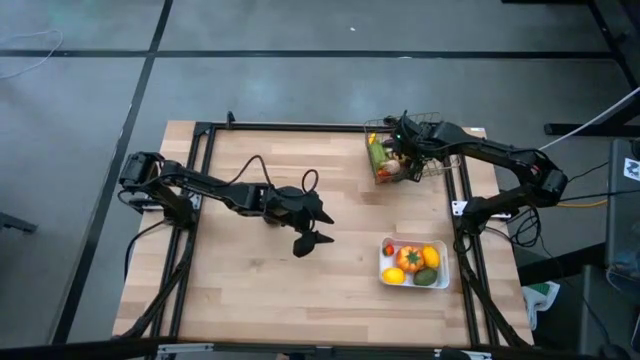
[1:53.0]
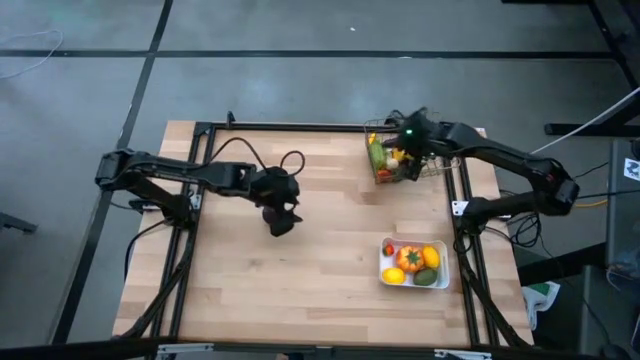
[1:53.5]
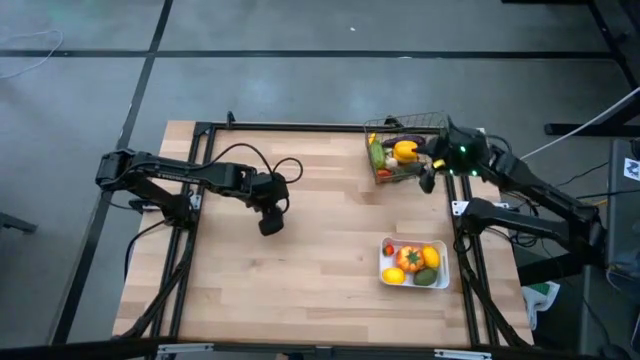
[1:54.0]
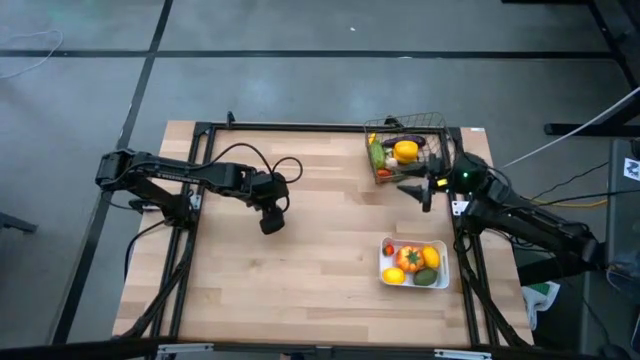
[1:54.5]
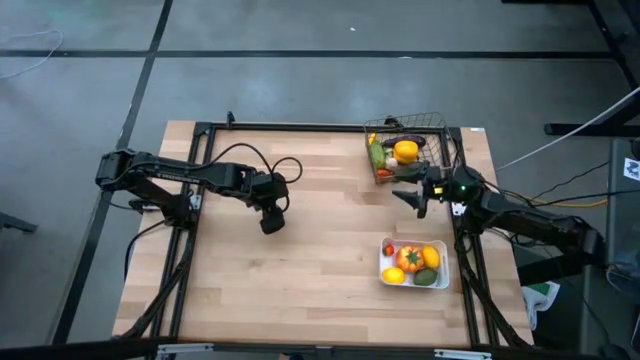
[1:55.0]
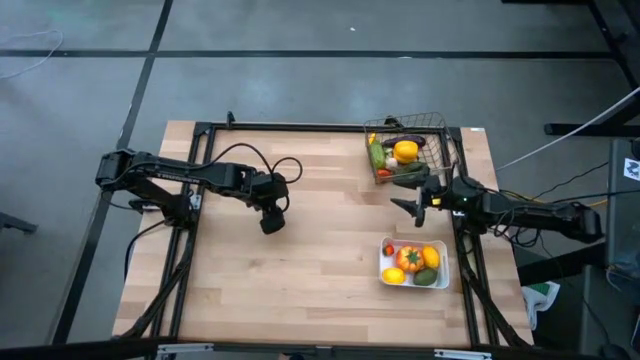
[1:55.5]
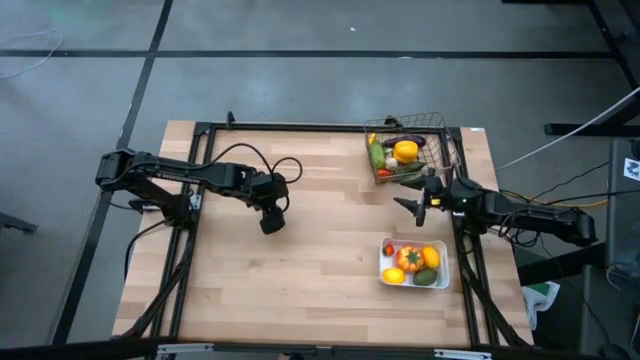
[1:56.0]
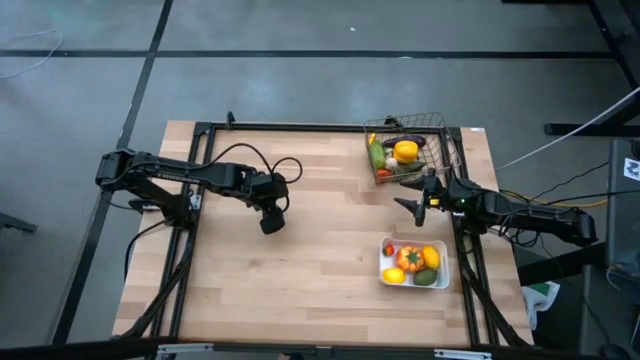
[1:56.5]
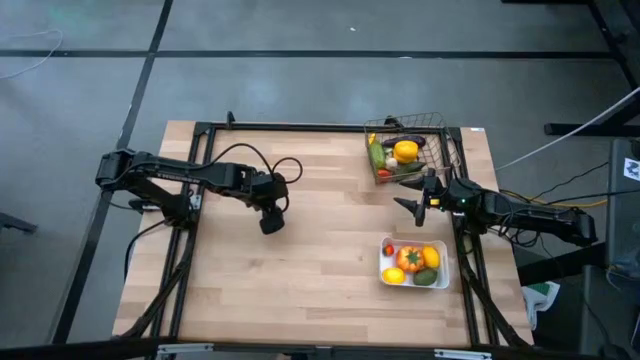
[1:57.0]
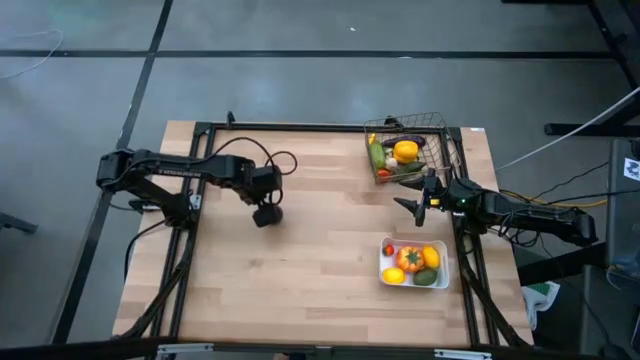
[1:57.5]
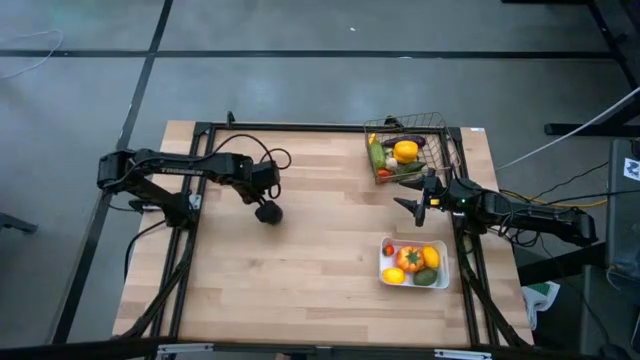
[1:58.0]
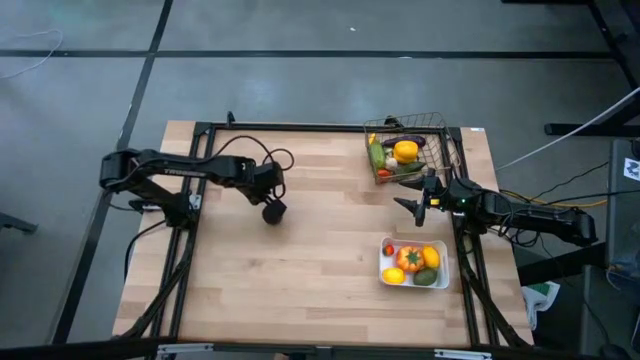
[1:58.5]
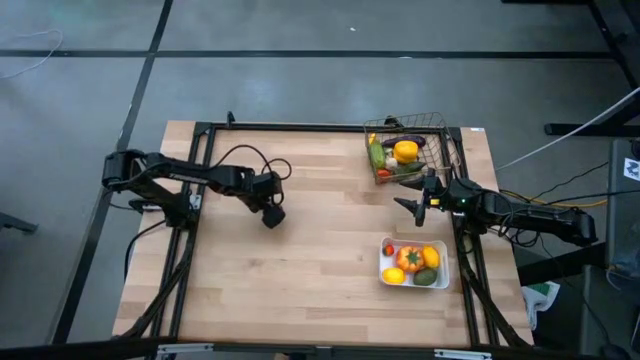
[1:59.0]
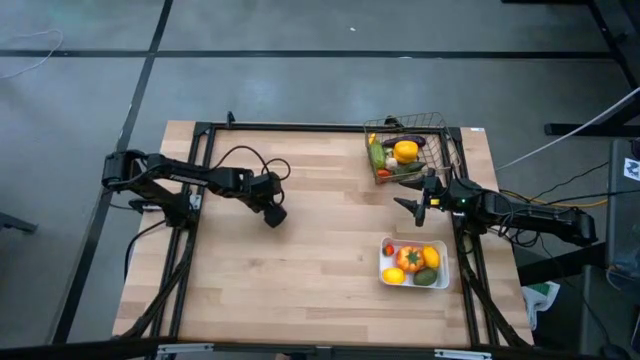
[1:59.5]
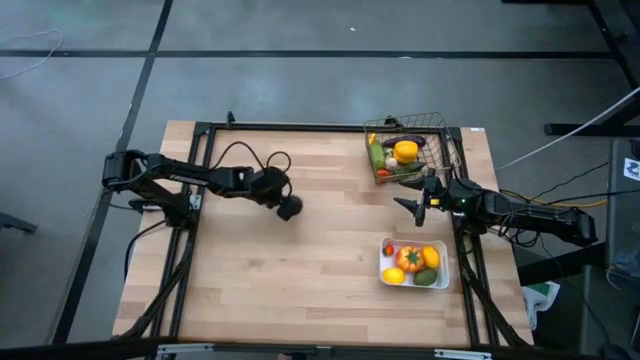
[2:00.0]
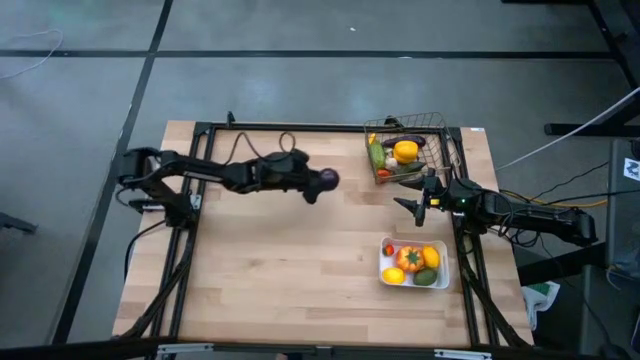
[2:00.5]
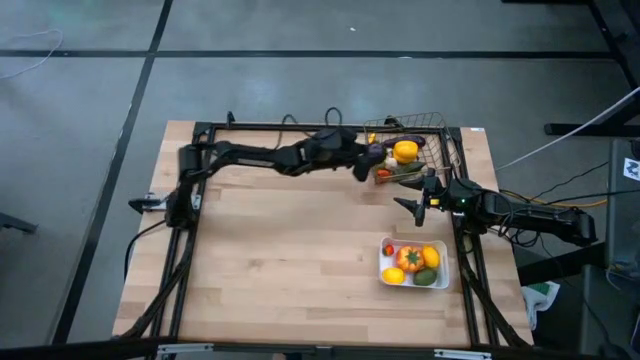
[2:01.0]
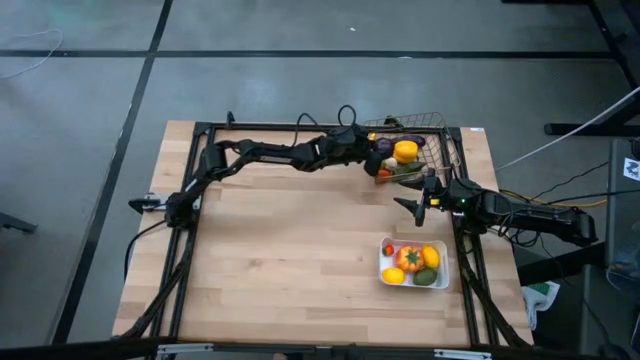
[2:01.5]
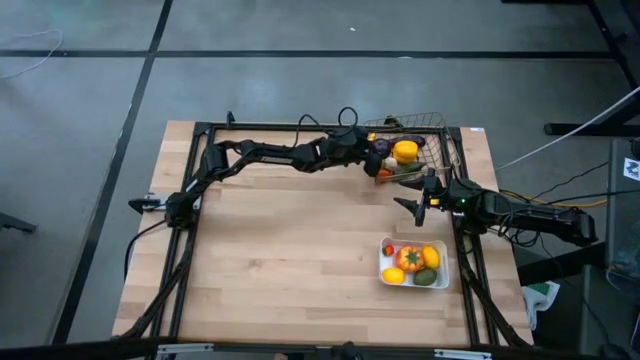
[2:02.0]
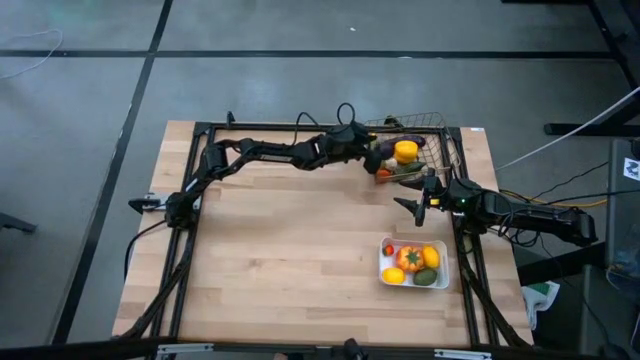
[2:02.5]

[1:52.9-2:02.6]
Task: Sort produce into baskets
Put the violet onion into the black wire basket

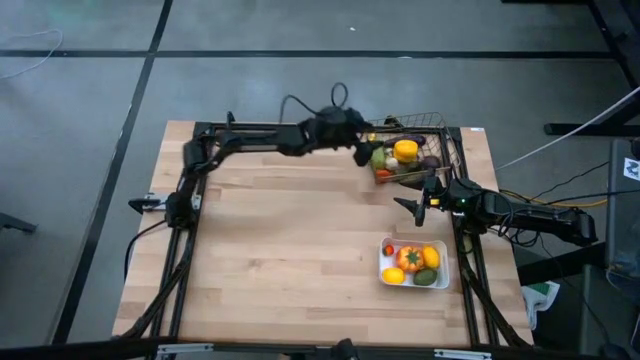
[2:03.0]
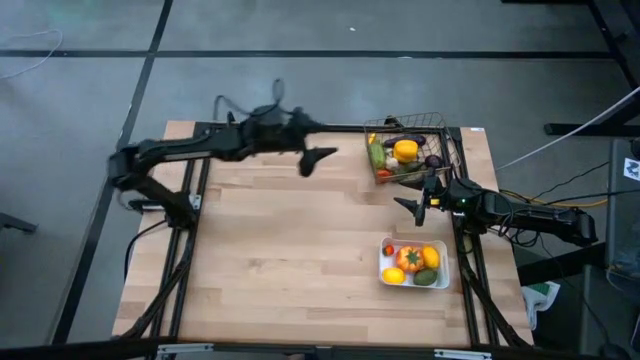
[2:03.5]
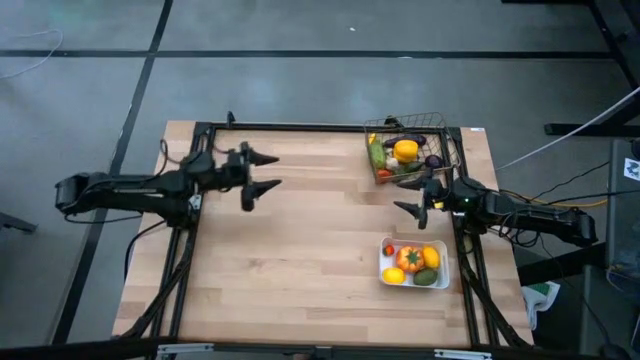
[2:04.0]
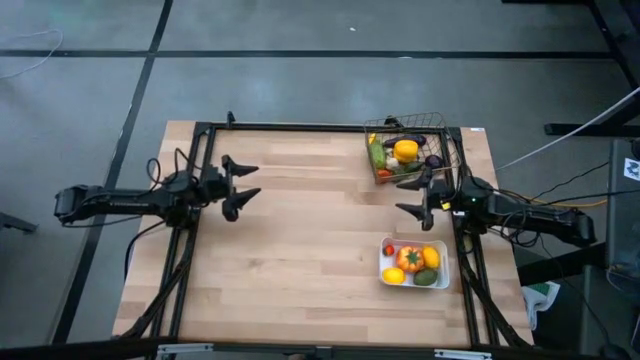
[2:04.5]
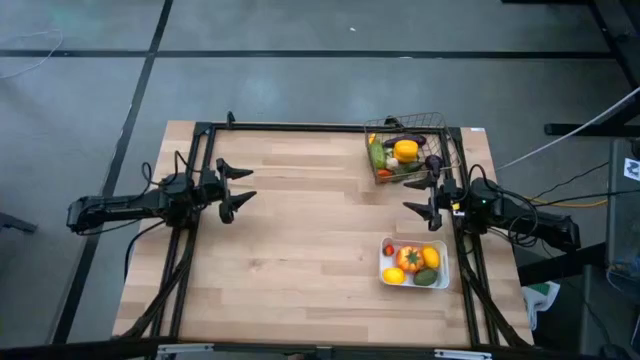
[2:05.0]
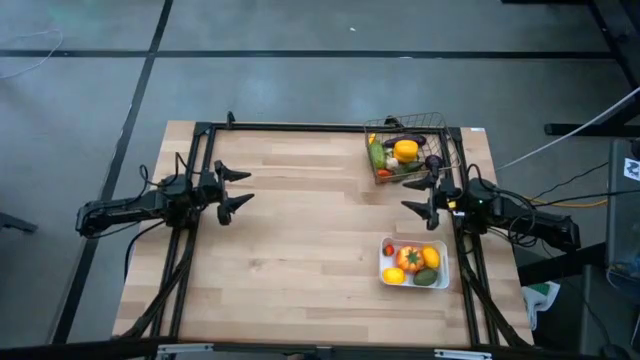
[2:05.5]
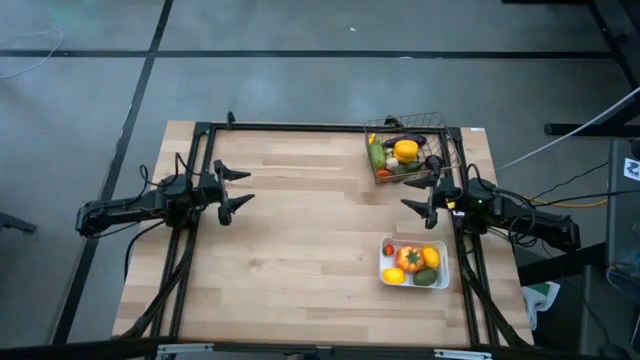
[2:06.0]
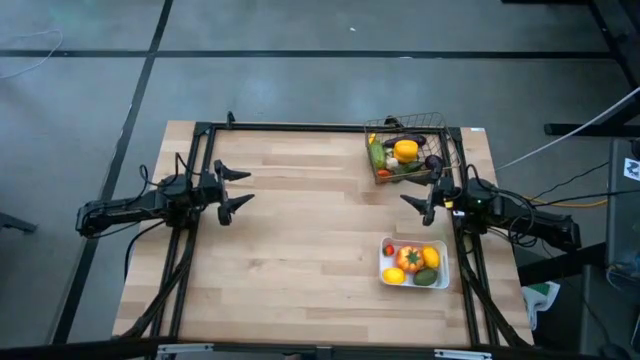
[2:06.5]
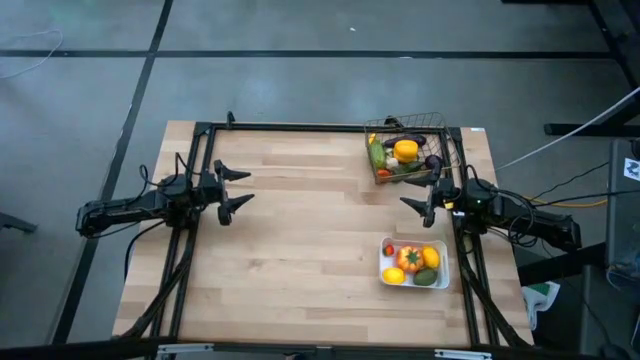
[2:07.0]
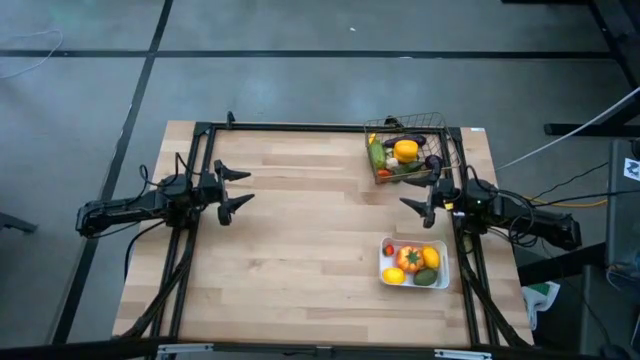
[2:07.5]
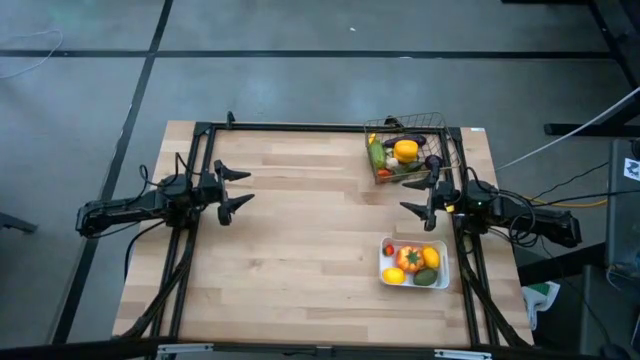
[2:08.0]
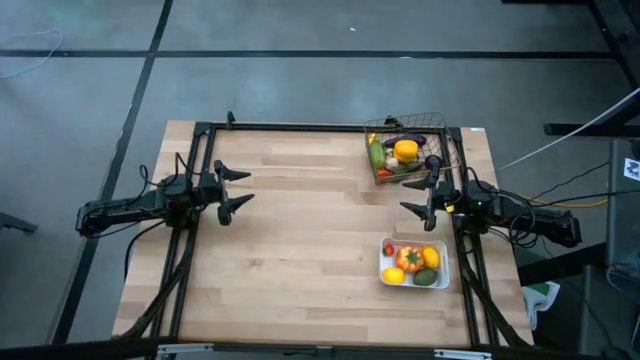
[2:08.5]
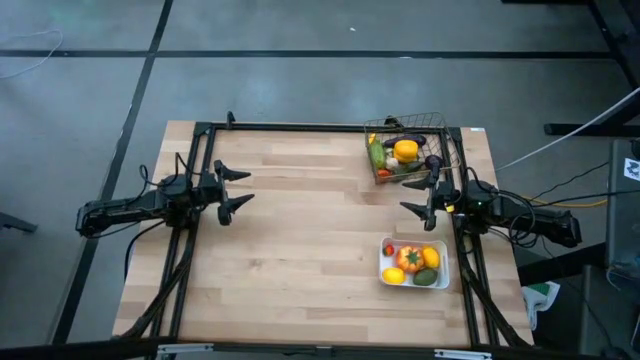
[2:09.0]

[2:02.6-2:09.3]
Return to Home Position

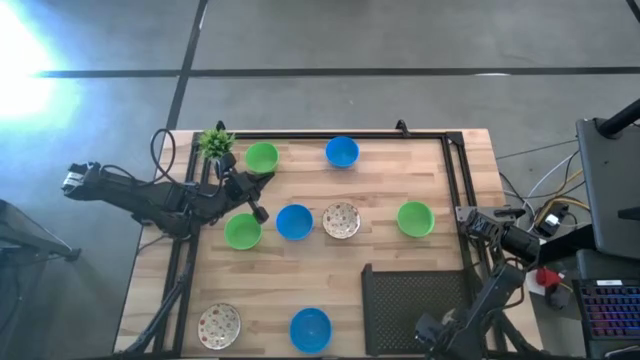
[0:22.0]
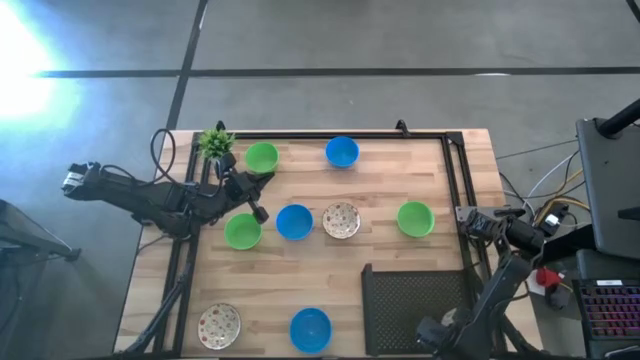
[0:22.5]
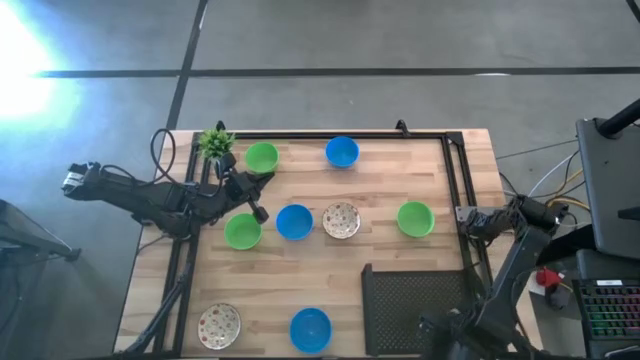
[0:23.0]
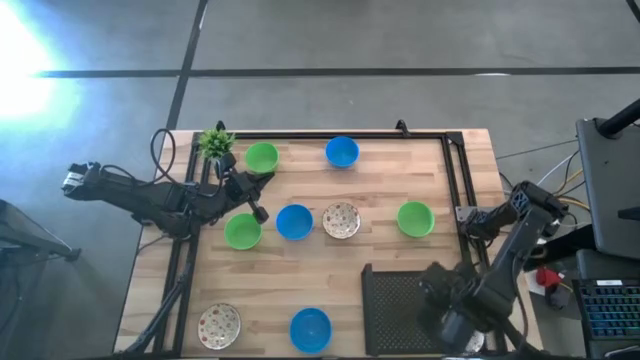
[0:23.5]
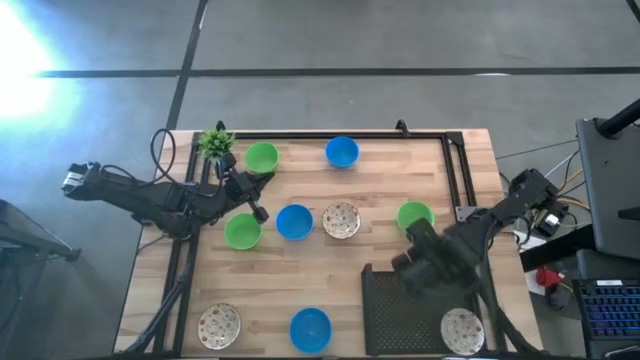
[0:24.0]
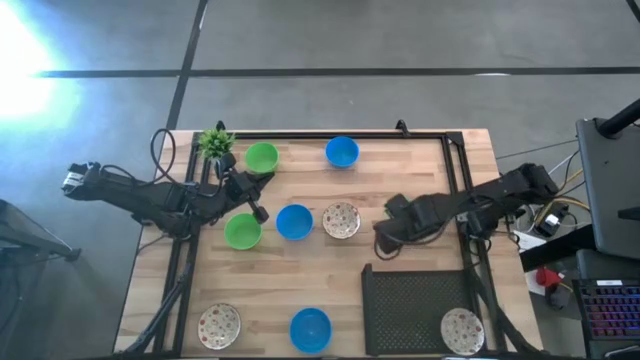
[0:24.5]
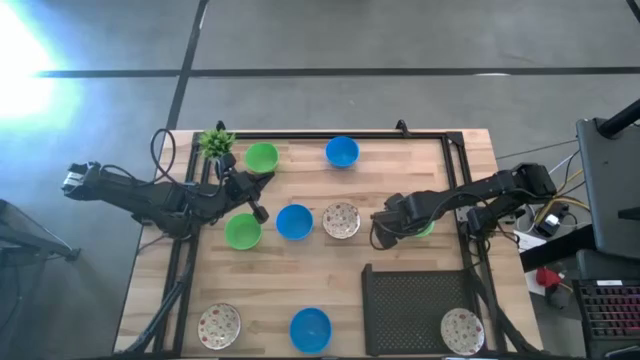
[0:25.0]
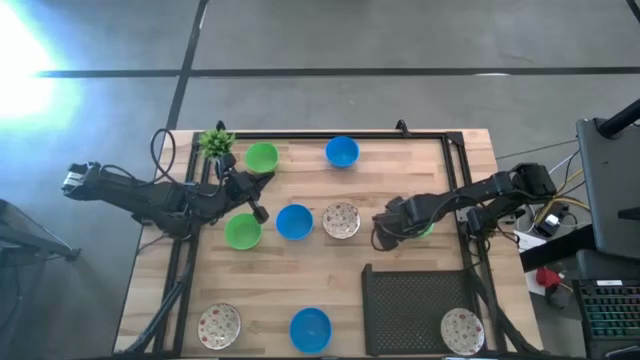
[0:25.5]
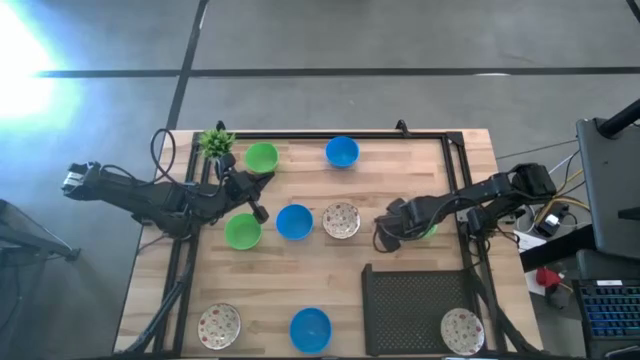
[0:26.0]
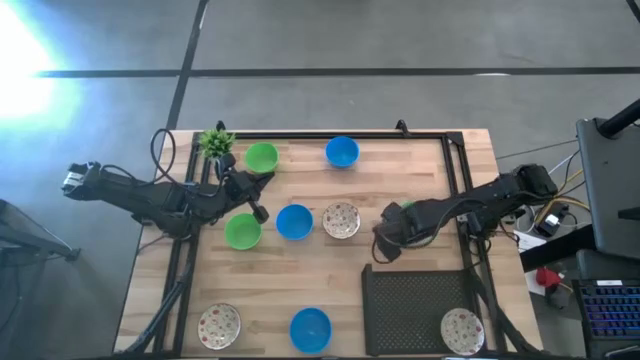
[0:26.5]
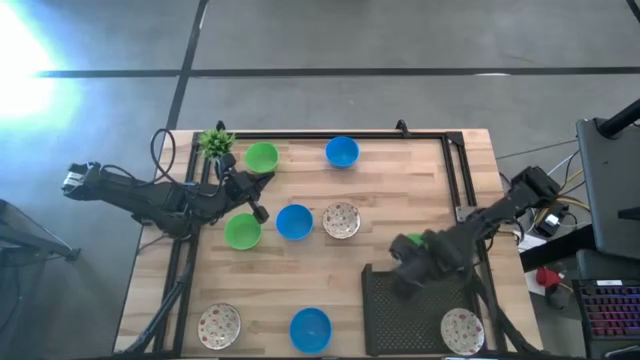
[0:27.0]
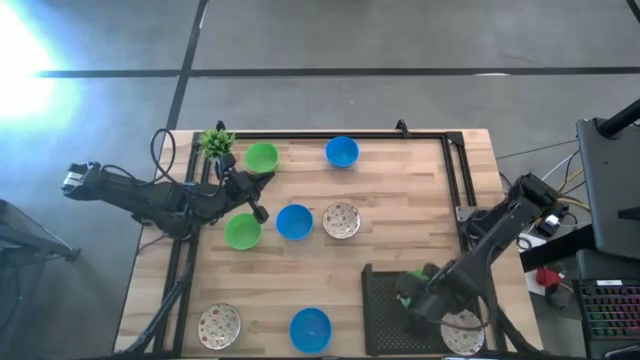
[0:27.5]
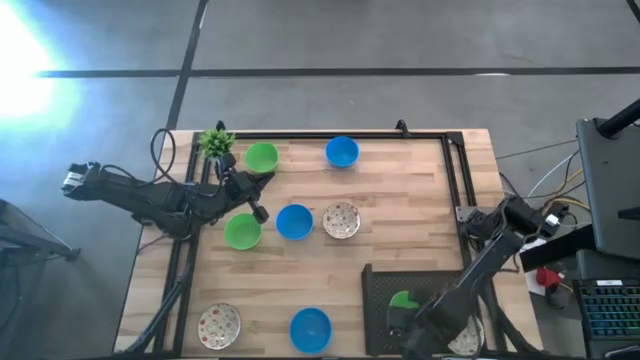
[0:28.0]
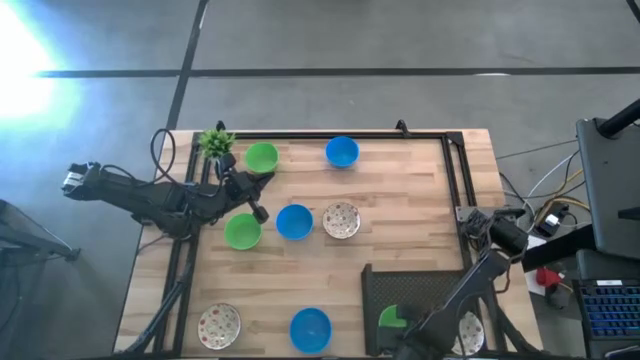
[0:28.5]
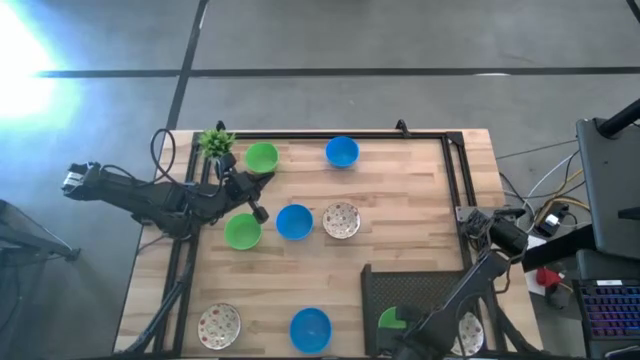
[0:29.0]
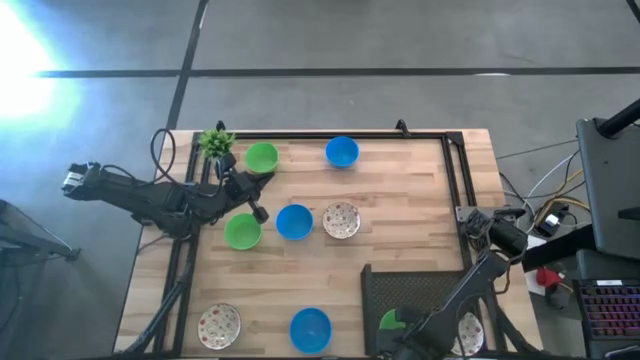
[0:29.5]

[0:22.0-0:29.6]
Task: Pick & Place Mini bowls
Put the bottom right green bowl on the shelf
